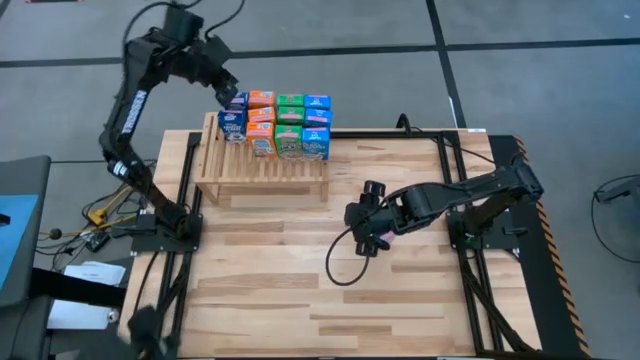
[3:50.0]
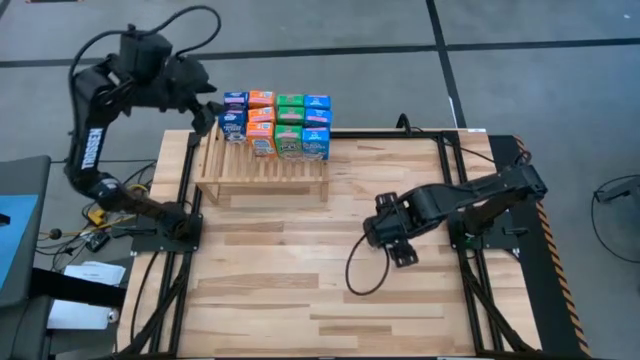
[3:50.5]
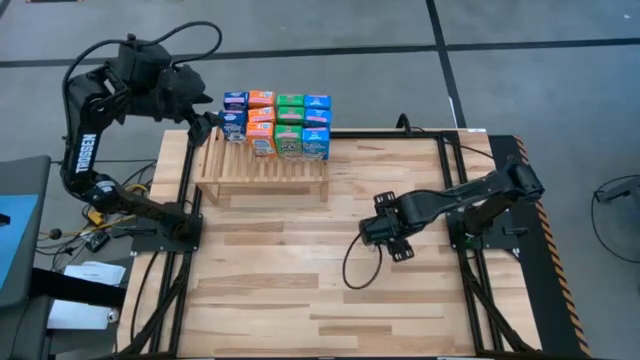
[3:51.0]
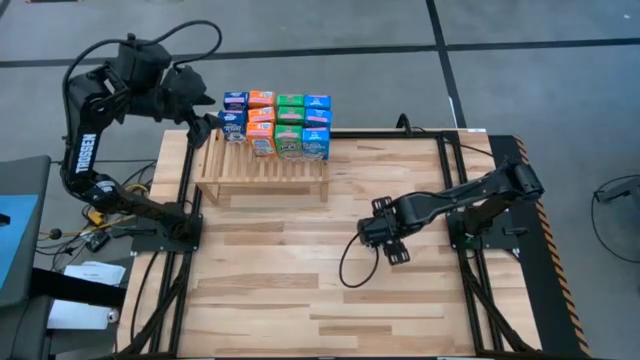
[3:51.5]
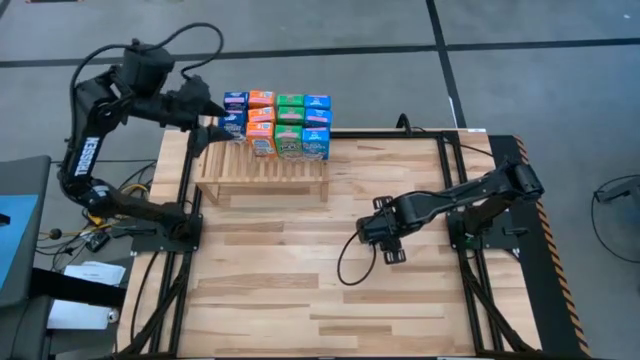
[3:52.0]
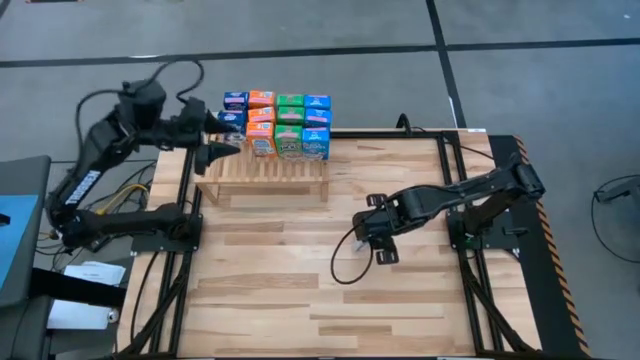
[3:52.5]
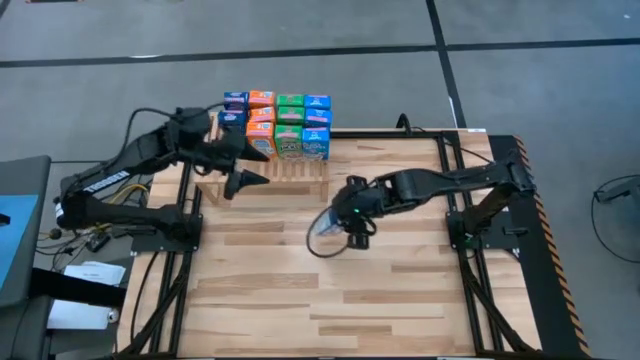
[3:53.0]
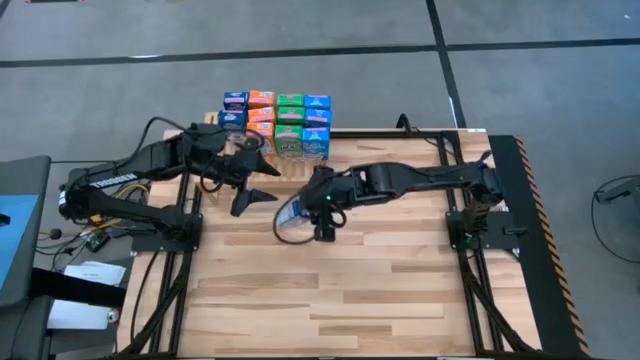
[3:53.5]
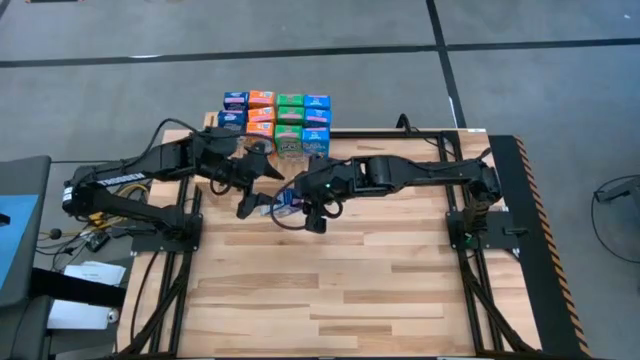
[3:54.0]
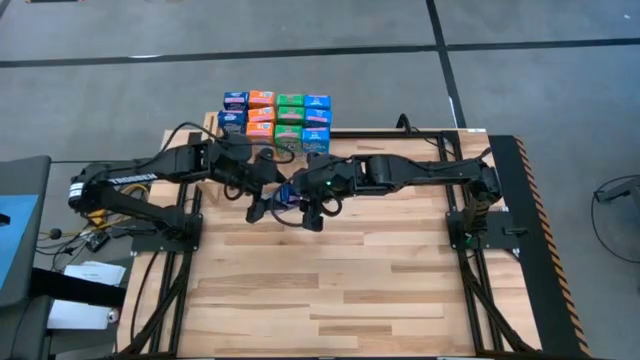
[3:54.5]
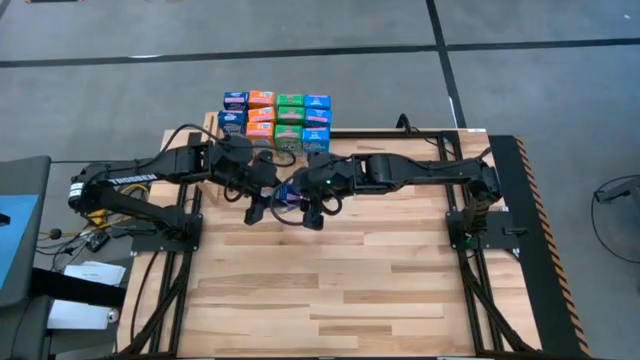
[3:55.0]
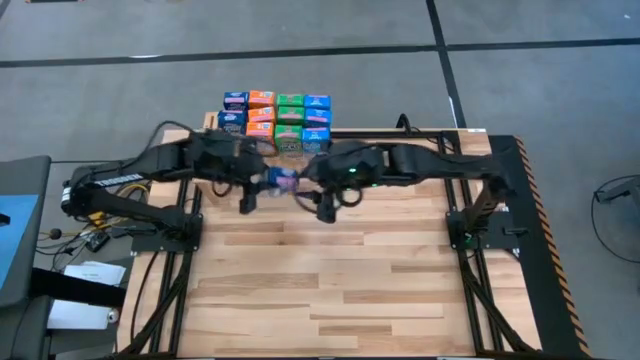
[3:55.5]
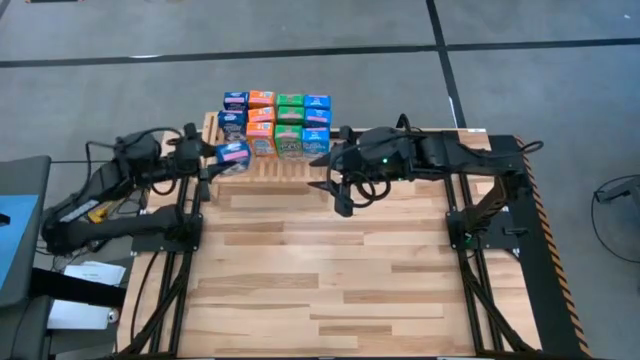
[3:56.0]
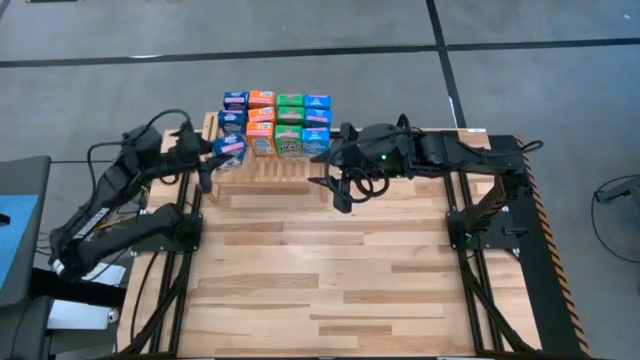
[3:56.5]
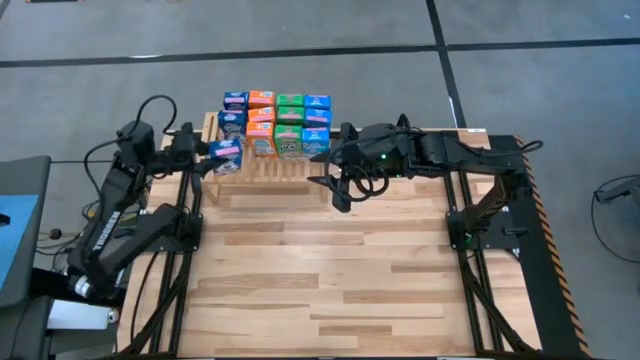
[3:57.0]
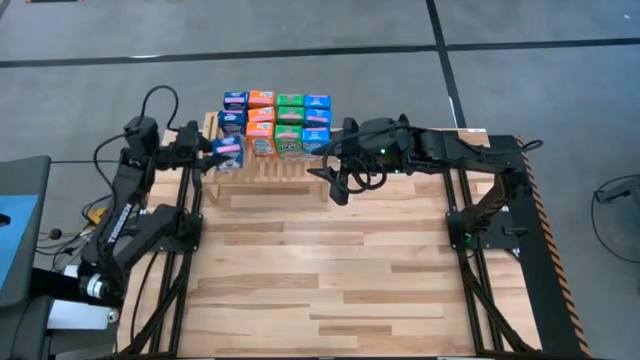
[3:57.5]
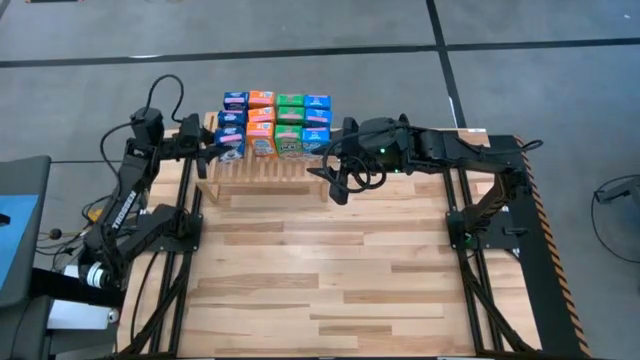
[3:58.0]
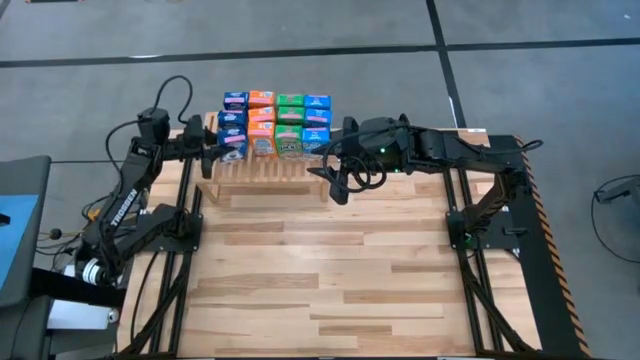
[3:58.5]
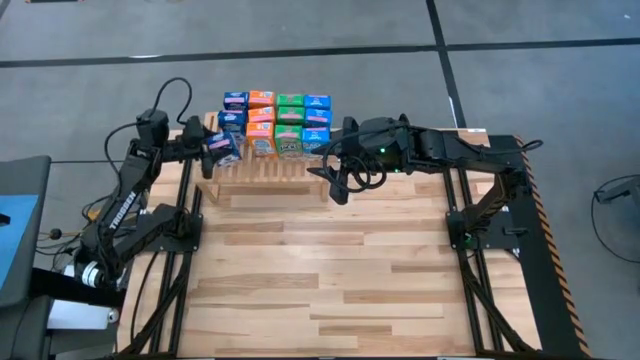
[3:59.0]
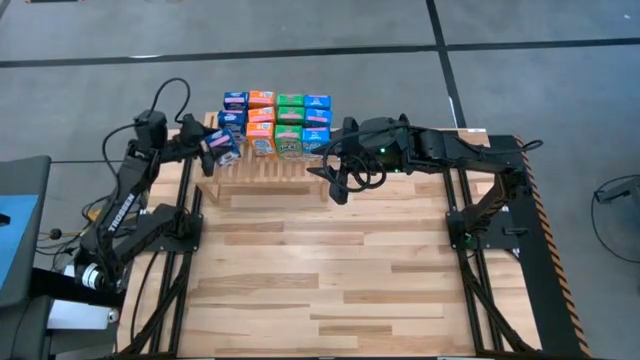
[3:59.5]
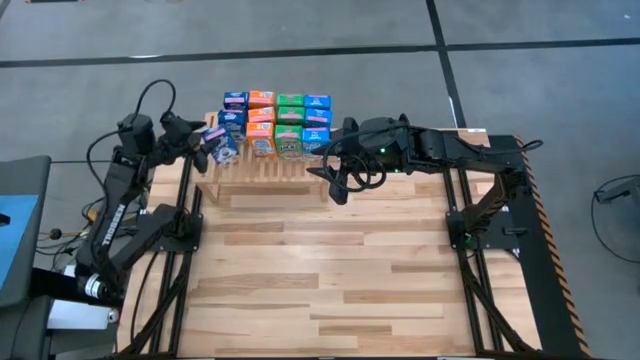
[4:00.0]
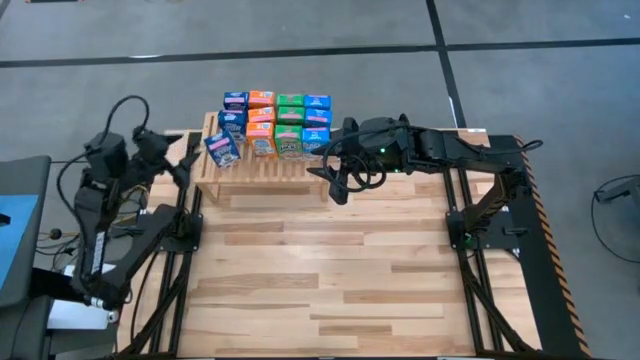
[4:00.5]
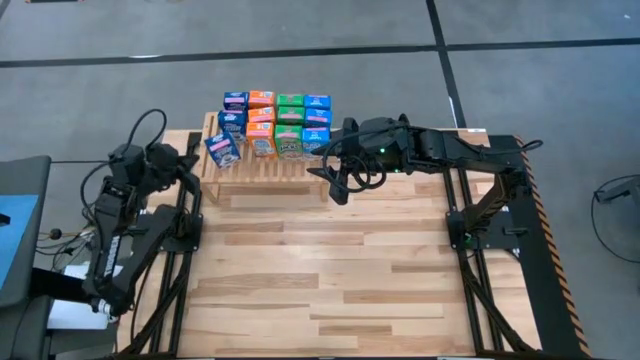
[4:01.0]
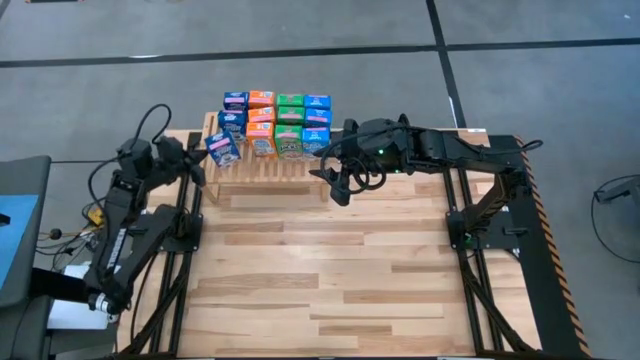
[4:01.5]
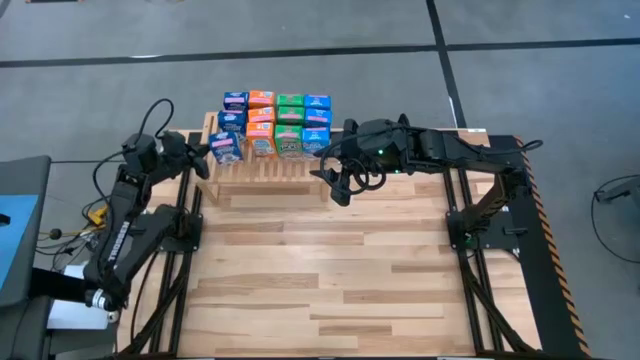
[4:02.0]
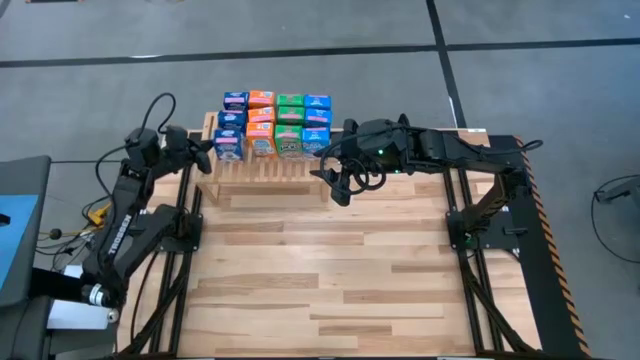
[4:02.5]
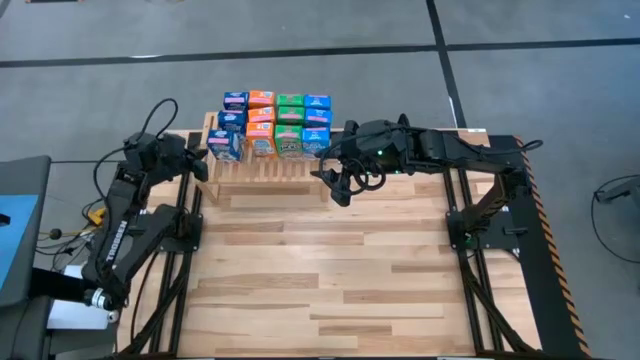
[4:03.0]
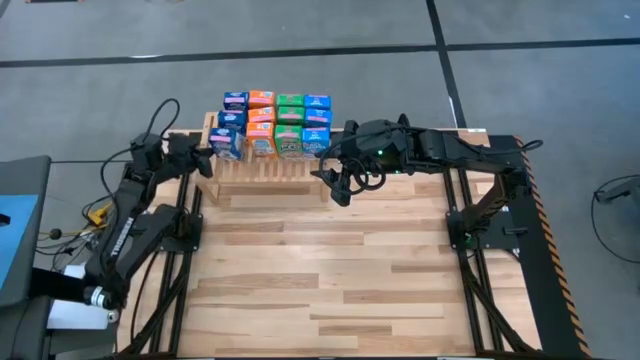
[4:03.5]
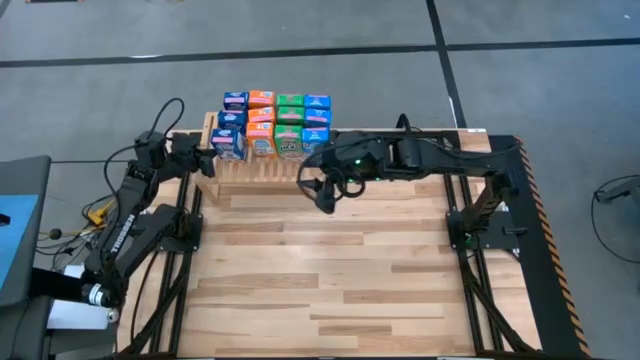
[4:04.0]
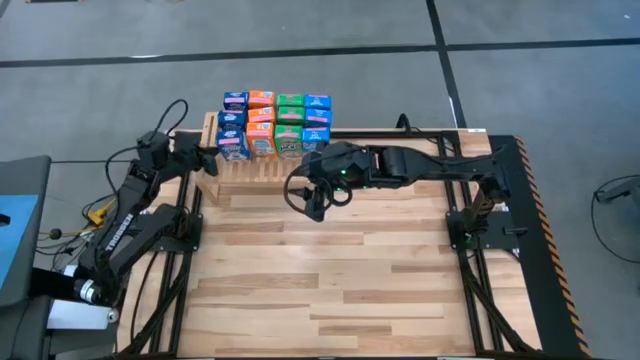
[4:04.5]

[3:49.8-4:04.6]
Task: Stack cereal on shelf
Put the blue cereal box on the shelf aligned with the other blue cereal boxes

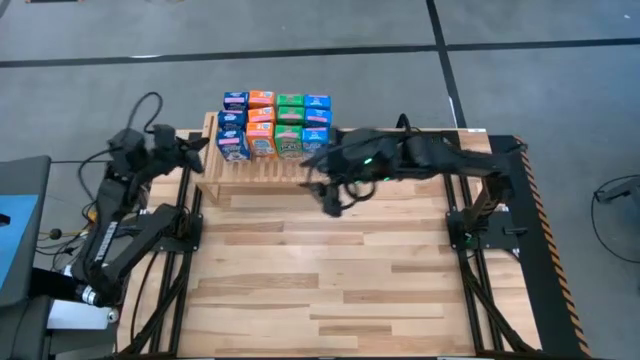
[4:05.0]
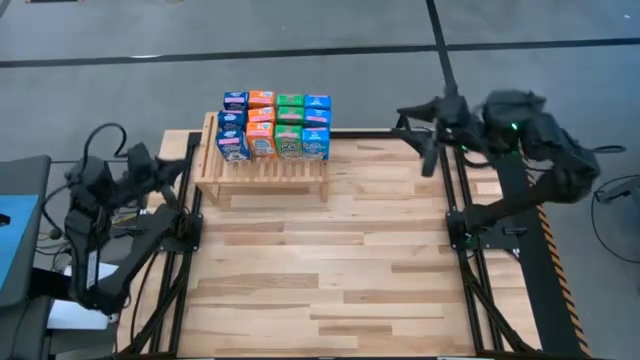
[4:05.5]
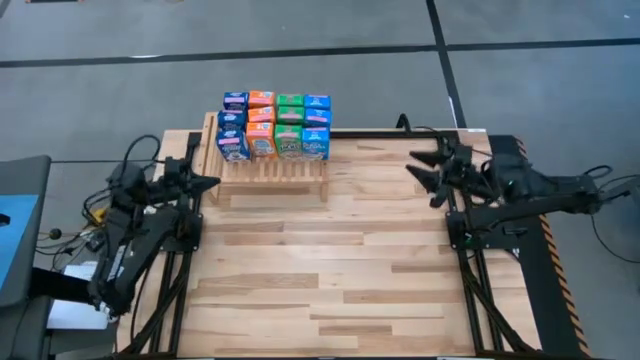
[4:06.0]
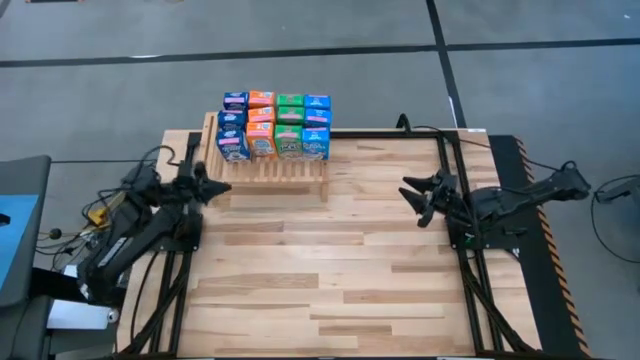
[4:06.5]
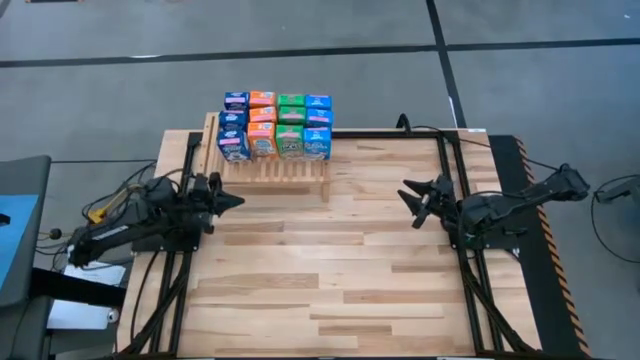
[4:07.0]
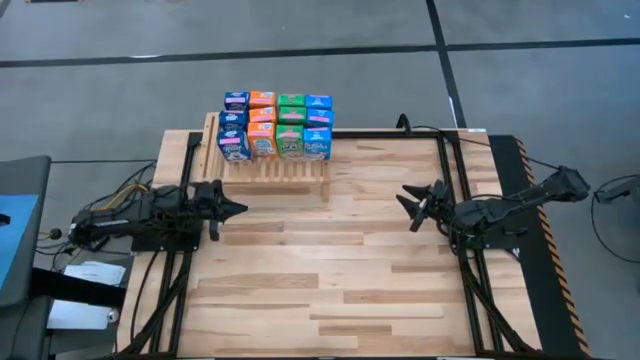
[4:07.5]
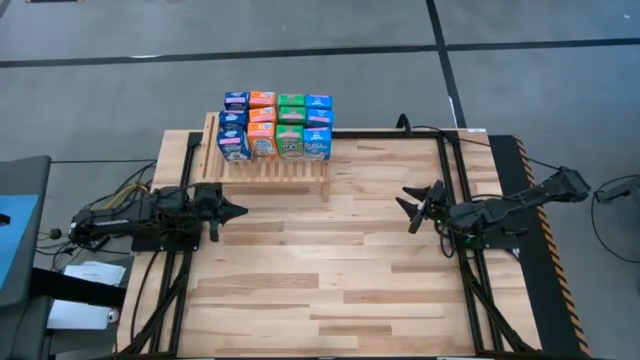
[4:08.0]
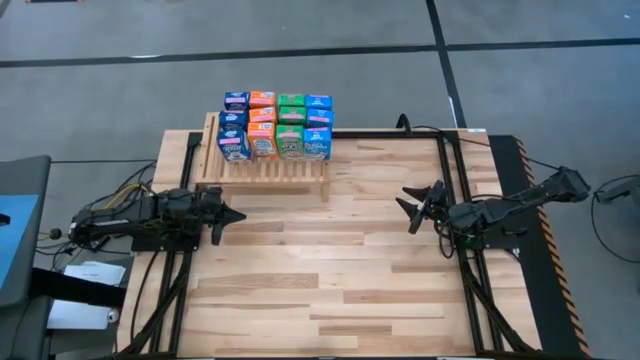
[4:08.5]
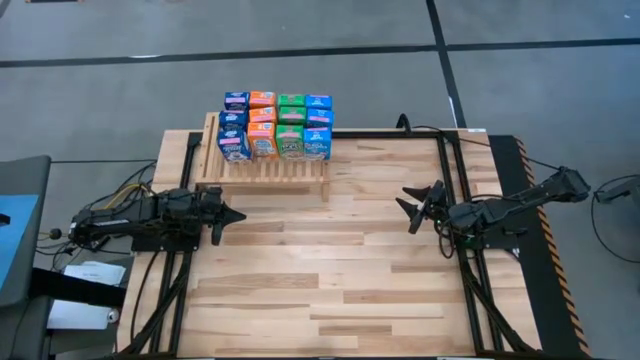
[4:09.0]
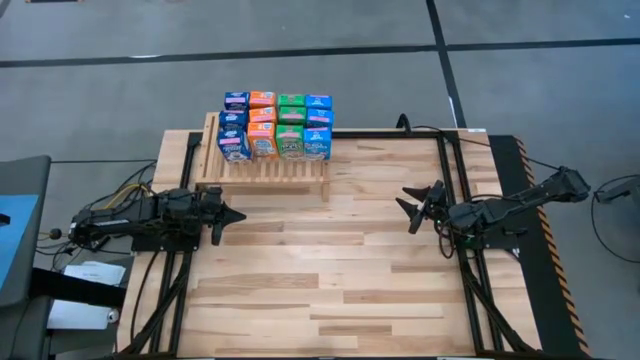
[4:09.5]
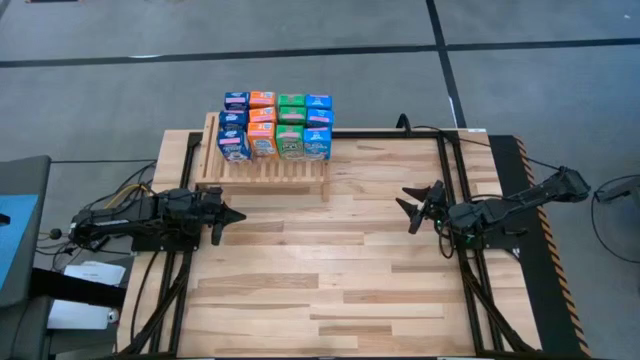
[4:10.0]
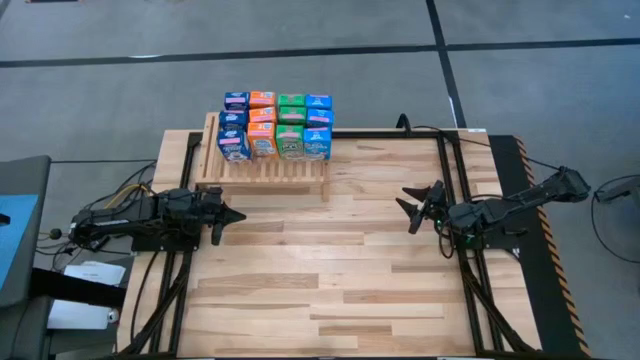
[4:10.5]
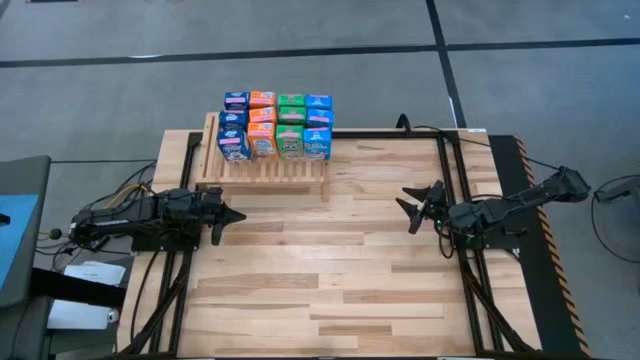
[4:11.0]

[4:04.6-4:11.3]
Return to Home Position
